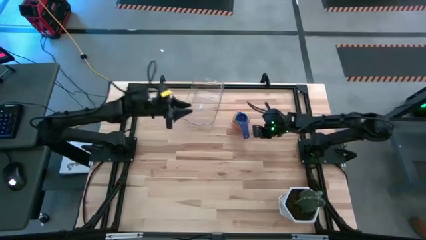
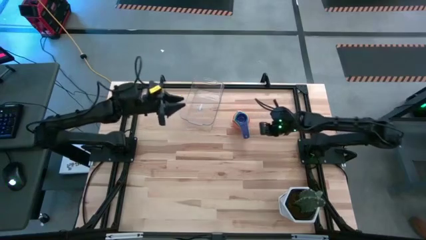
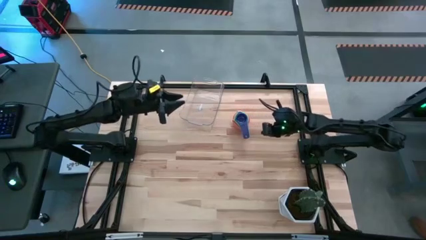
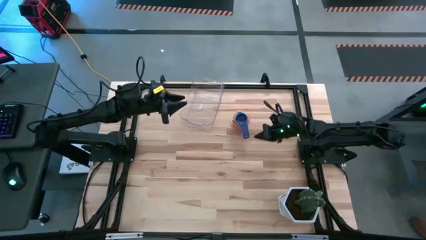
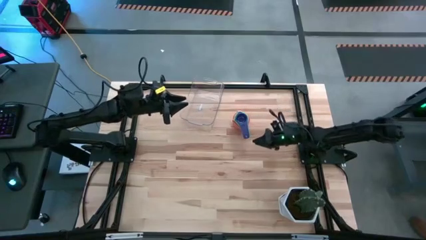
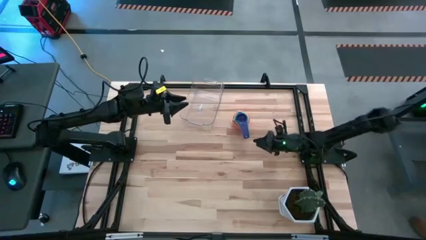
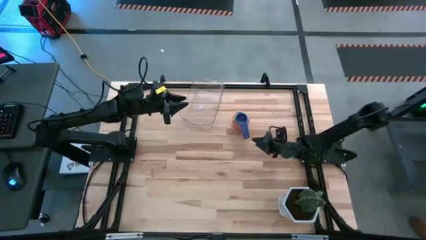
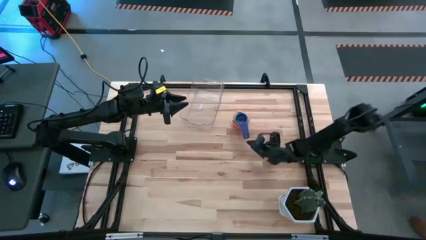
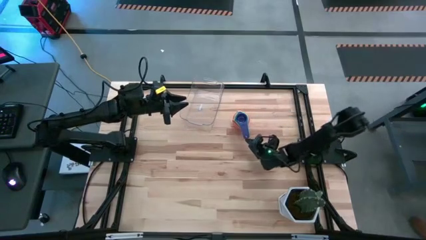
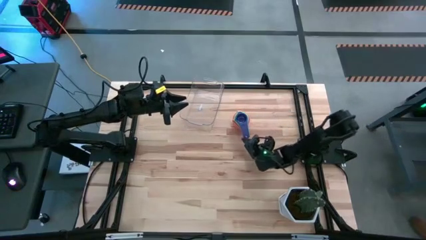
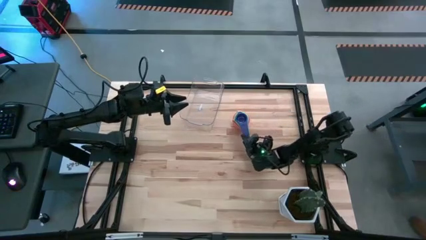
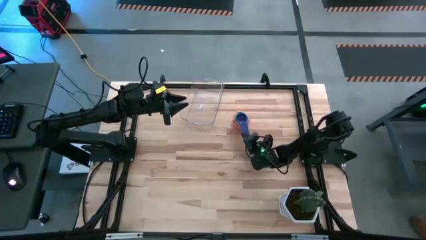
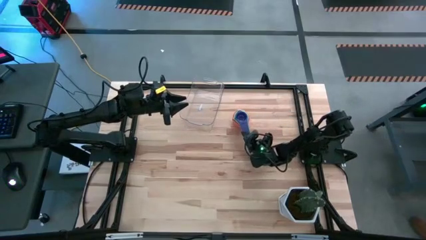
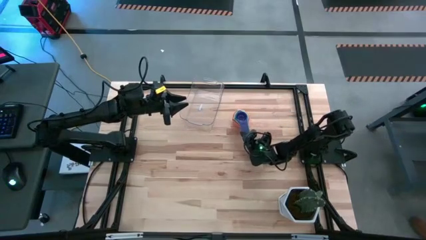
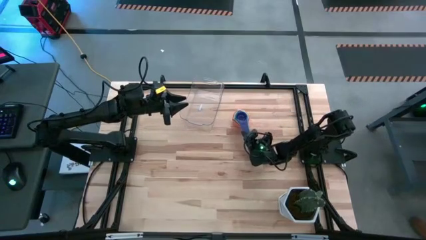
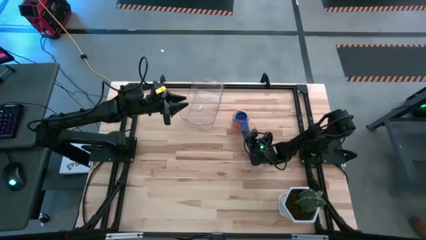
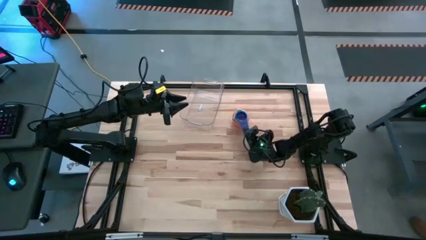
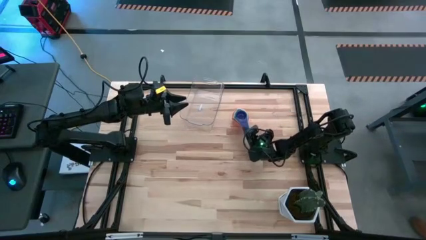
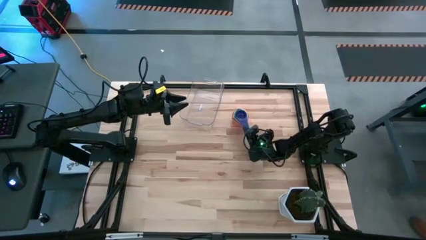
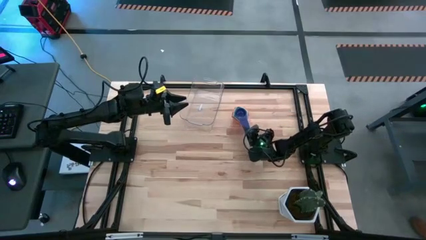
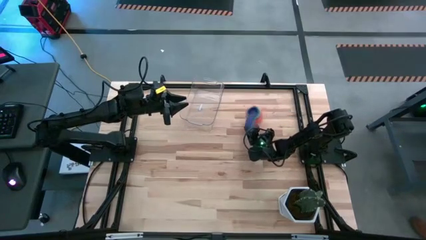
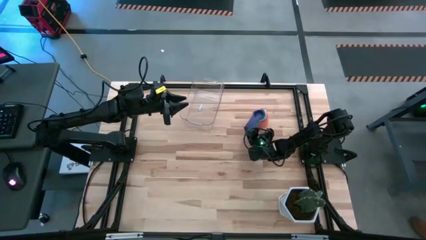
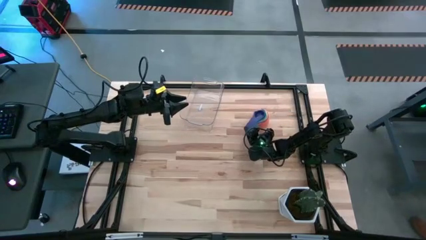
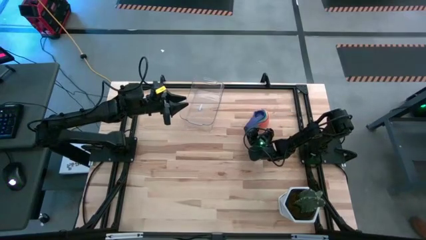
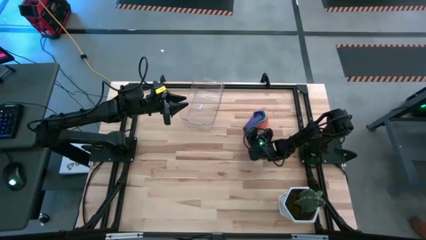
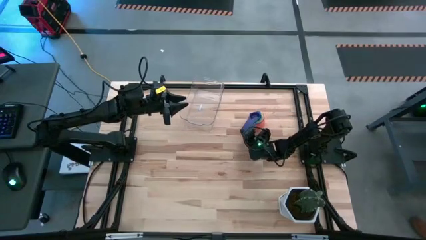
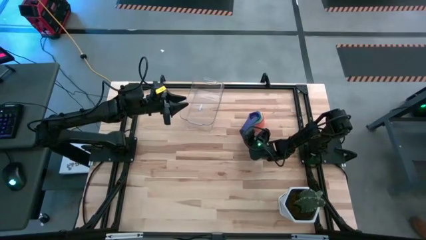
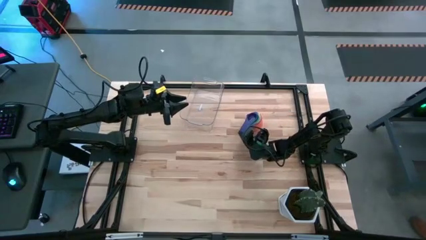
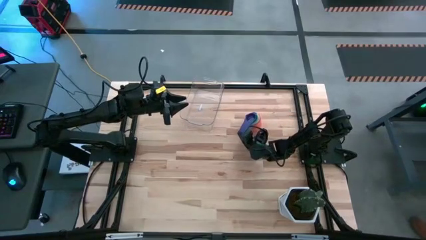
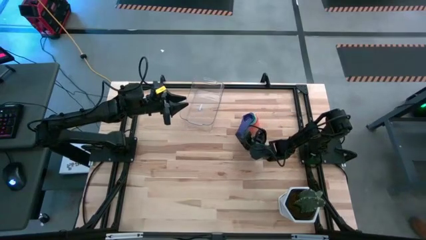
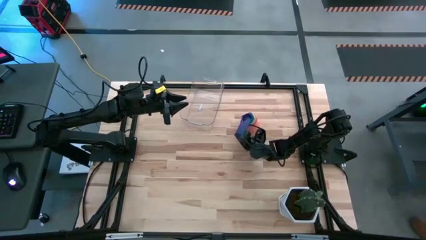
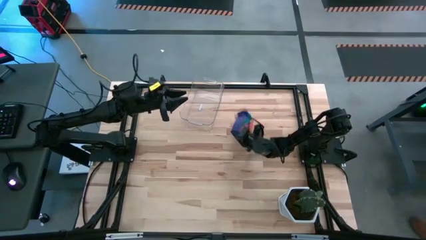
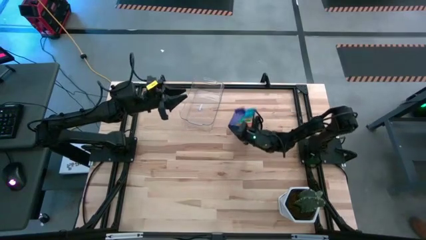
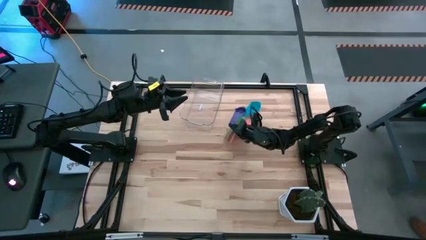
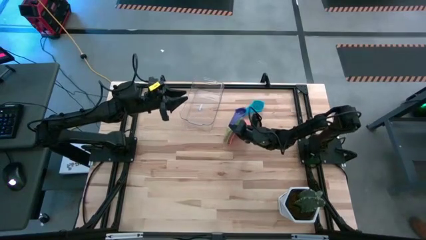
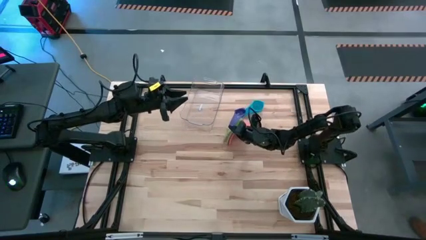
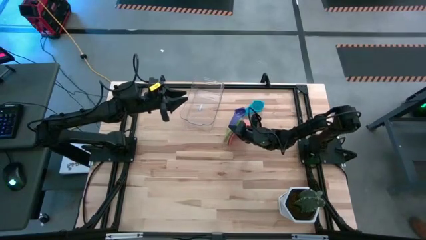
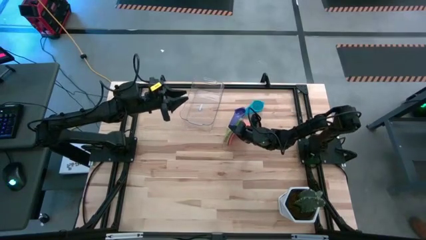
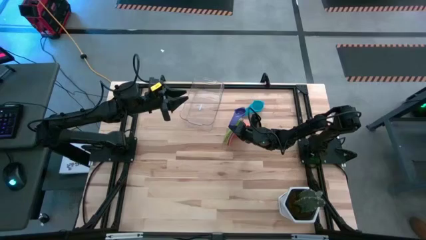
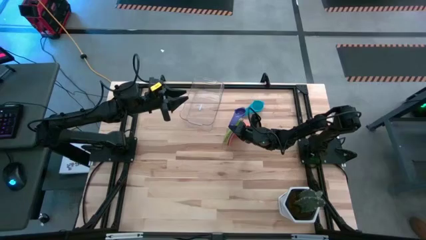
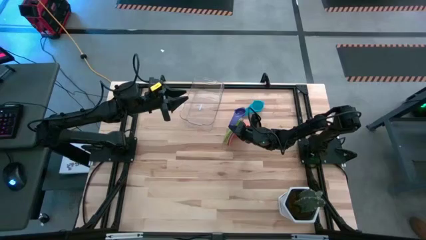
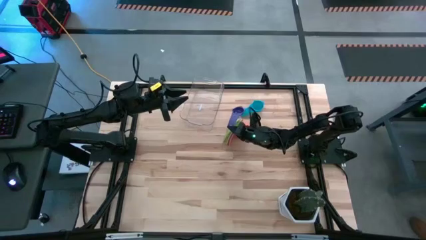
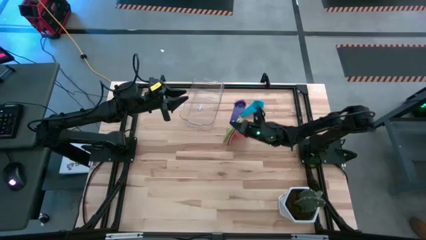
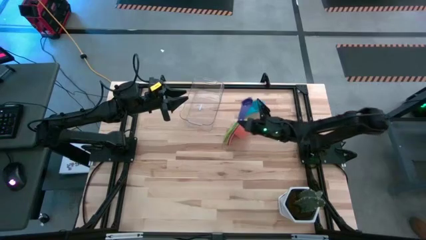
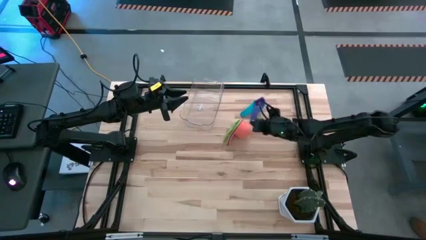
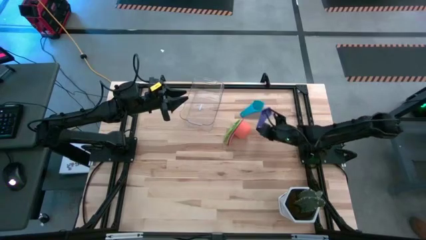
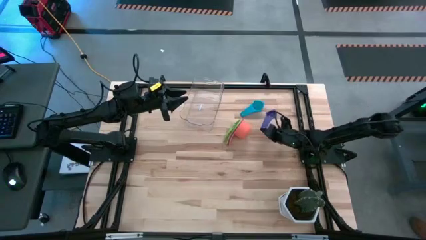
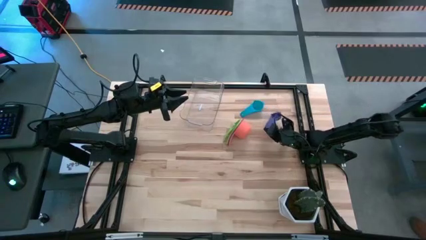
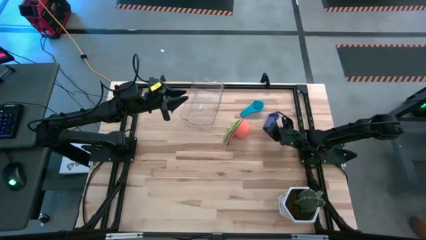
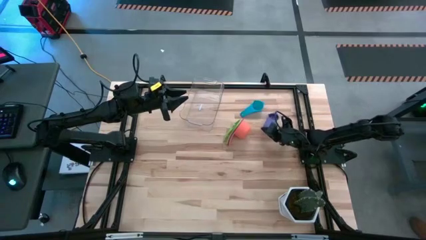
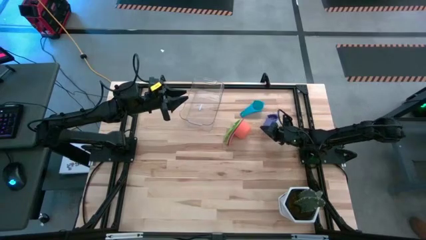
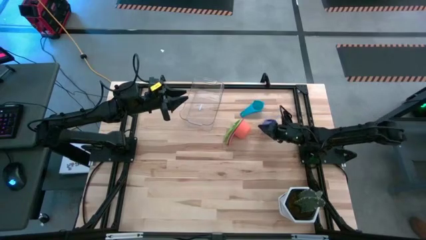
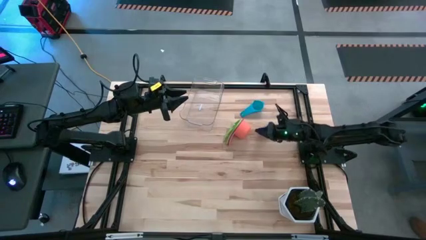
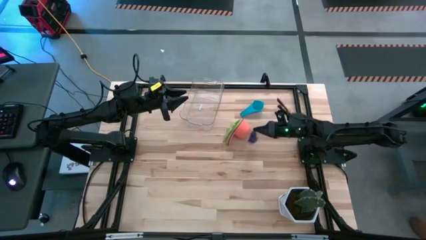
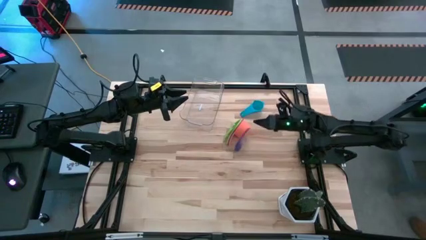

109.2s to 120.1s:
Task: Nest measuring cups in basket
Put the stacked colored measuring cups in the transparent bin

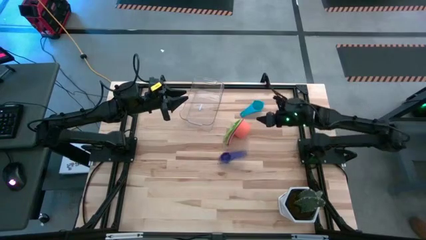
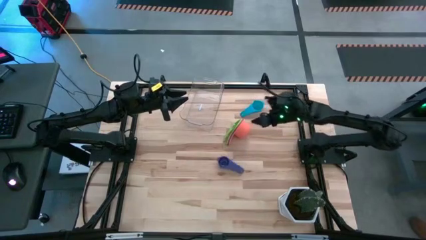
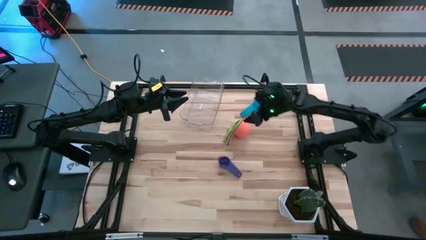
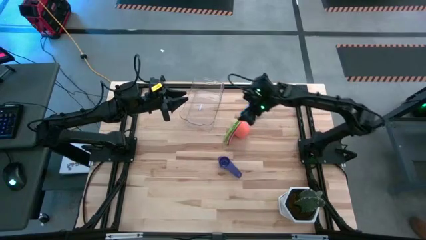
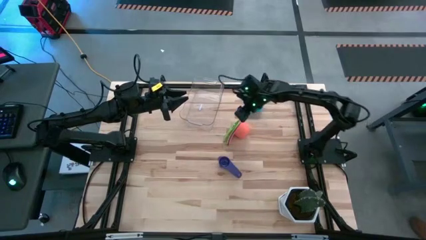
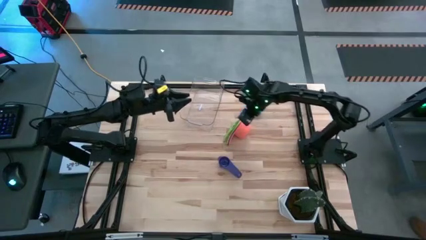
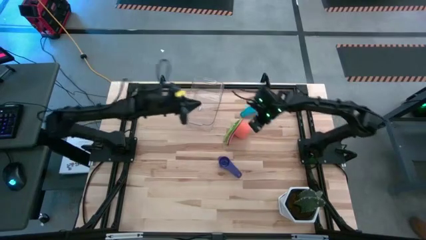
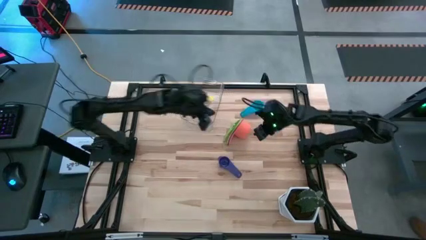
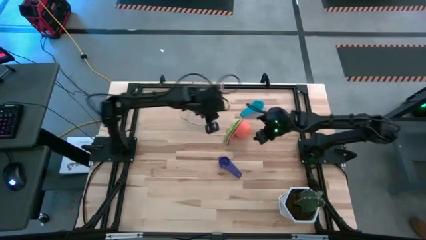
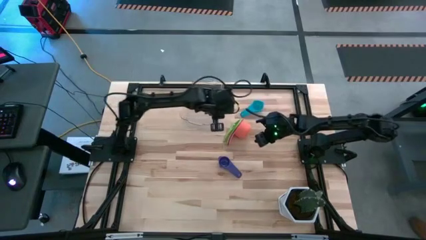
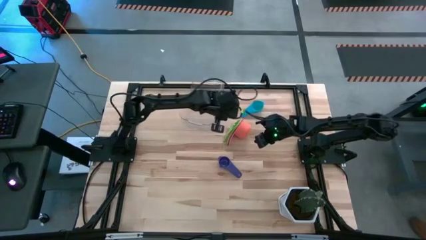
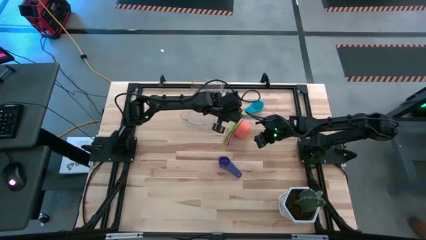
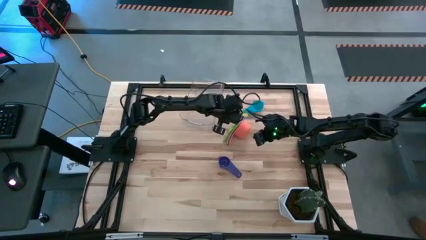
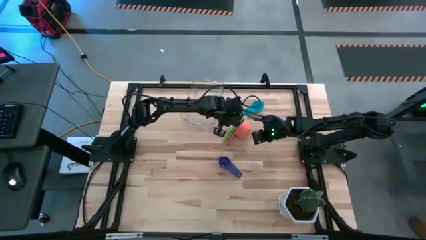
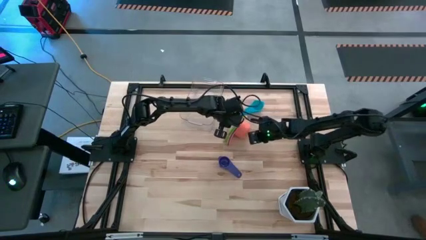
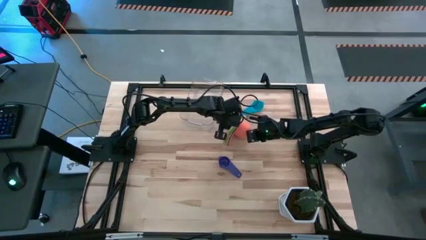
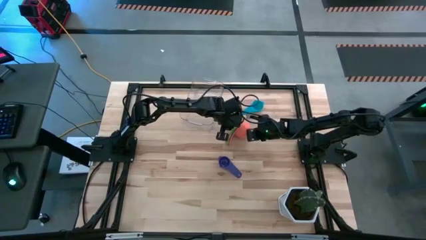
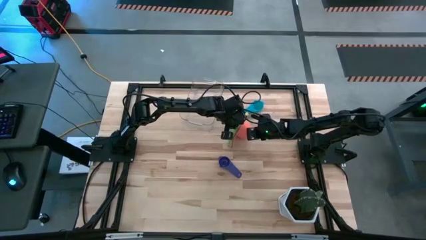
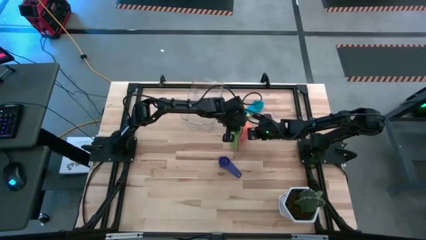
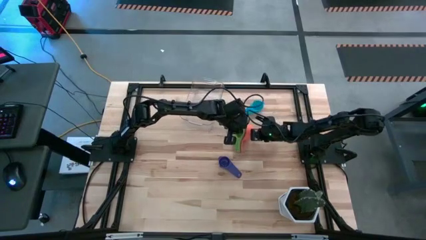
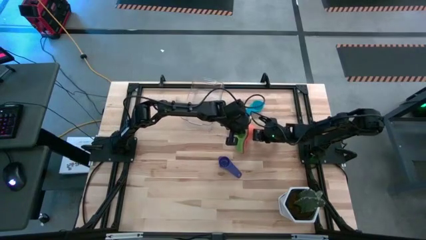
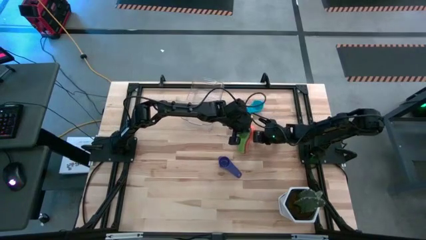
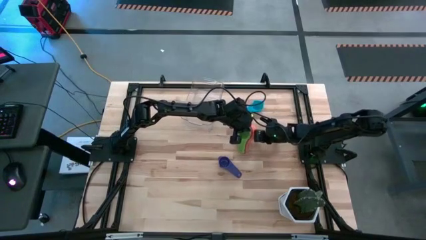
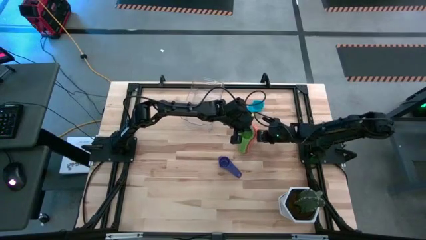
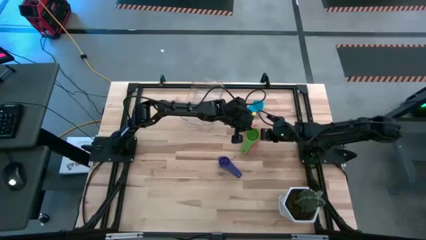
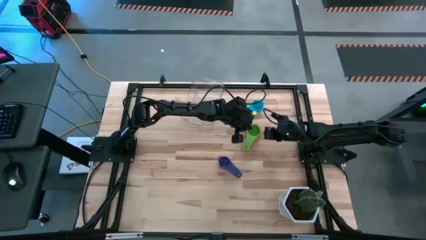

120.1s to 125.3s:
Adjust the colored measuring cups
